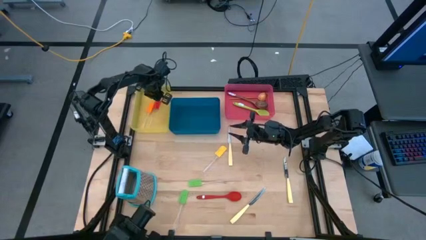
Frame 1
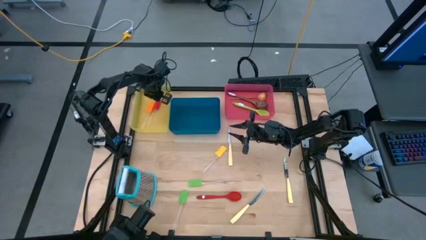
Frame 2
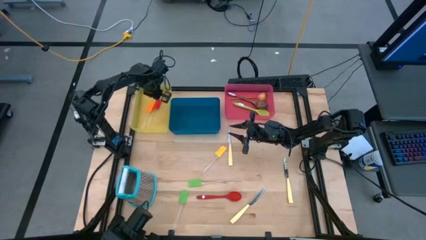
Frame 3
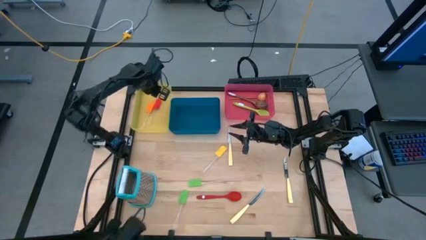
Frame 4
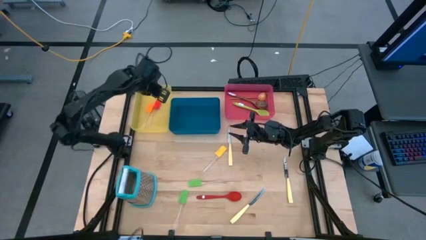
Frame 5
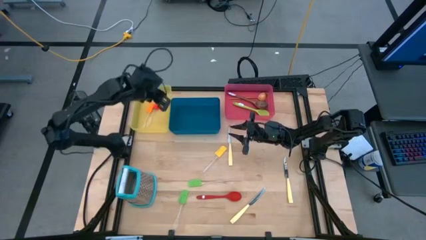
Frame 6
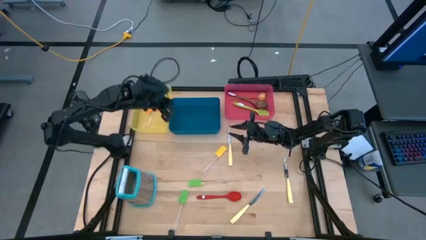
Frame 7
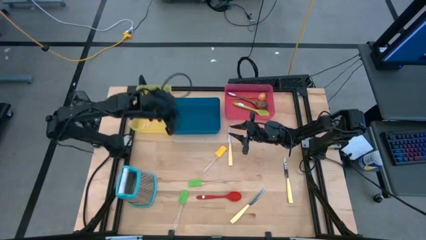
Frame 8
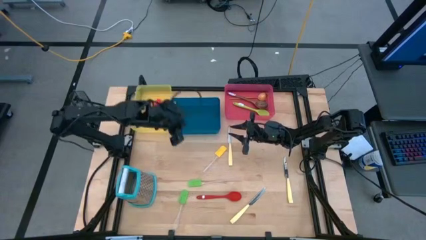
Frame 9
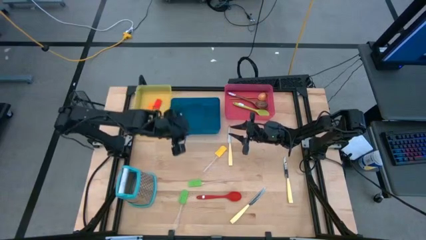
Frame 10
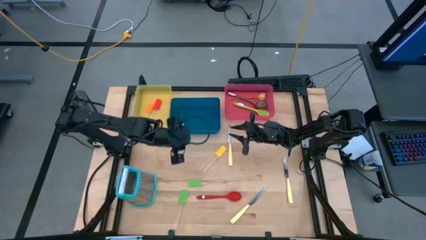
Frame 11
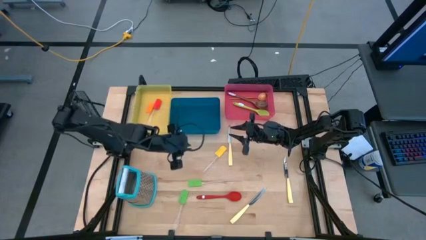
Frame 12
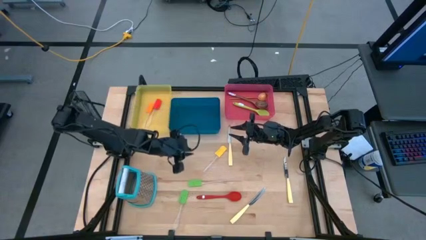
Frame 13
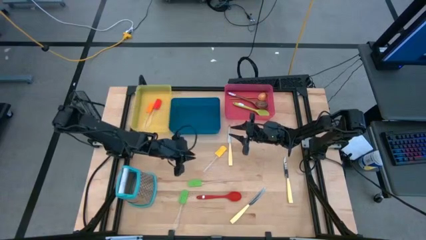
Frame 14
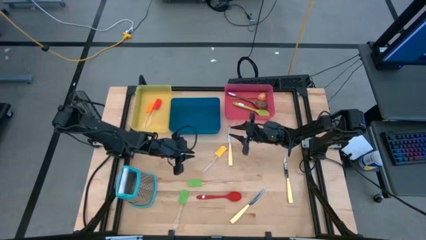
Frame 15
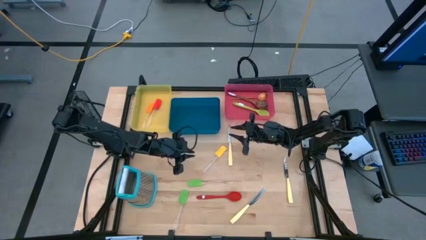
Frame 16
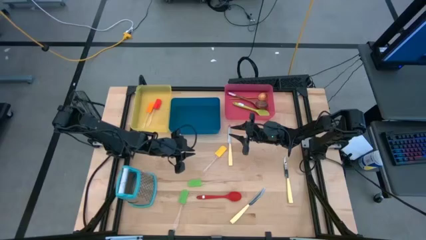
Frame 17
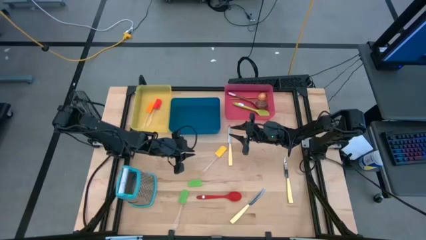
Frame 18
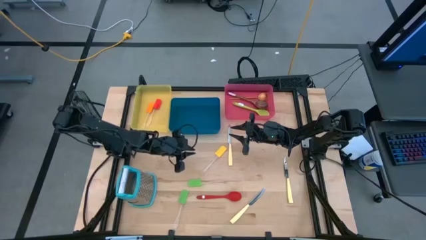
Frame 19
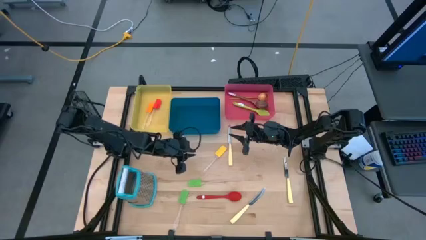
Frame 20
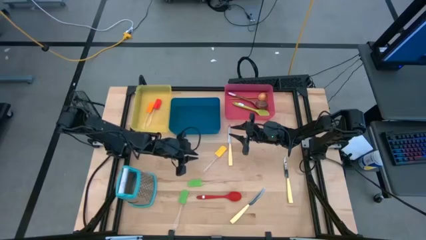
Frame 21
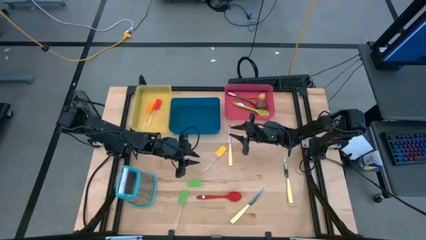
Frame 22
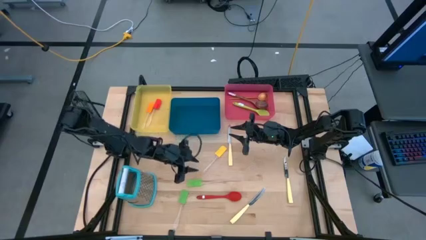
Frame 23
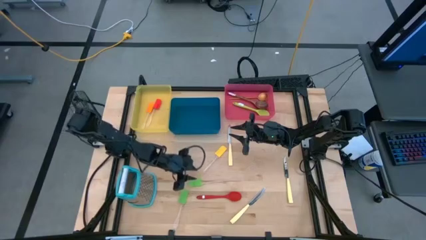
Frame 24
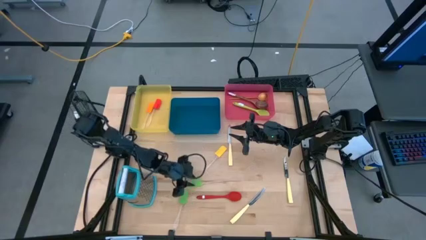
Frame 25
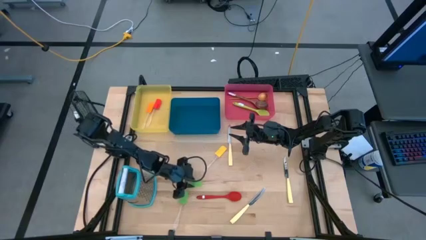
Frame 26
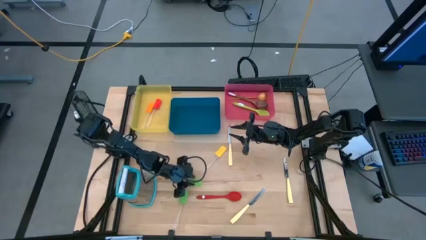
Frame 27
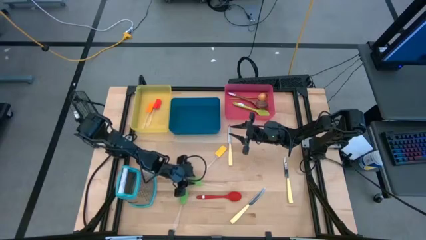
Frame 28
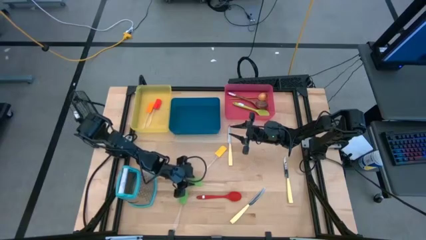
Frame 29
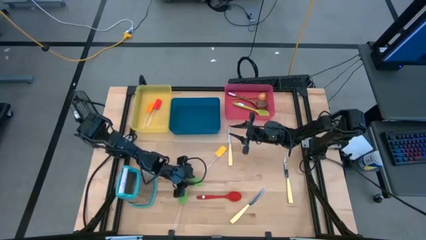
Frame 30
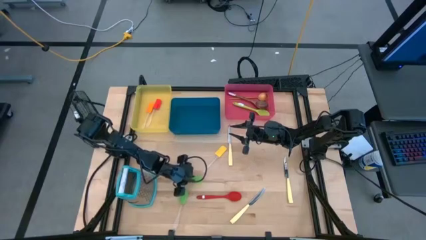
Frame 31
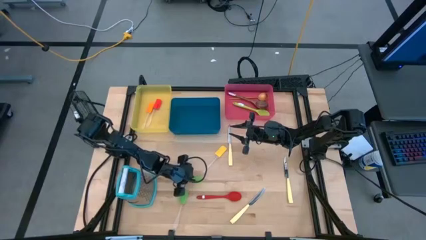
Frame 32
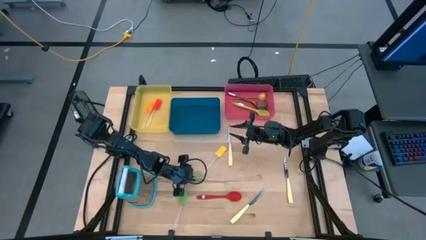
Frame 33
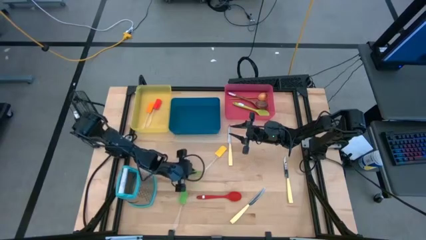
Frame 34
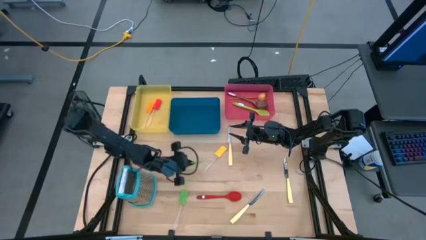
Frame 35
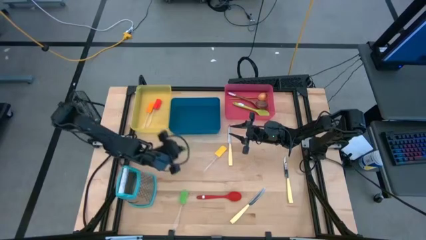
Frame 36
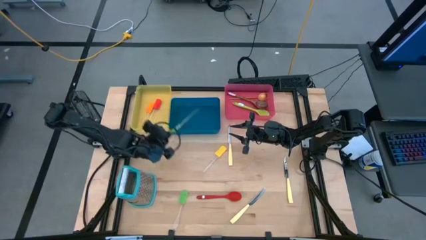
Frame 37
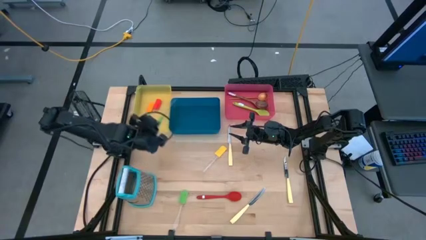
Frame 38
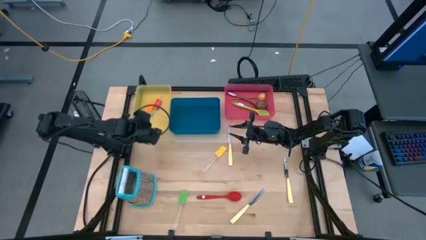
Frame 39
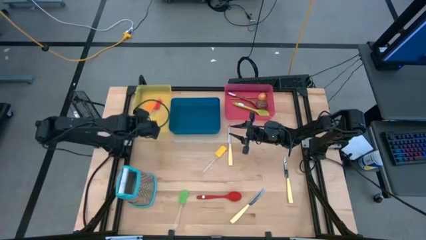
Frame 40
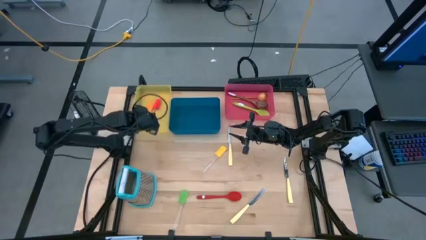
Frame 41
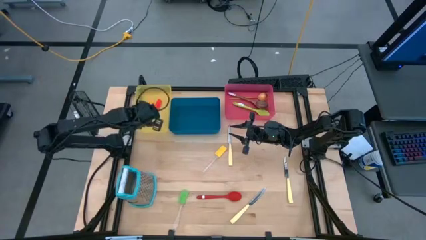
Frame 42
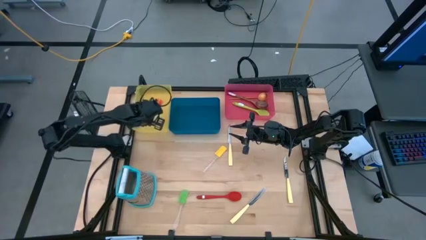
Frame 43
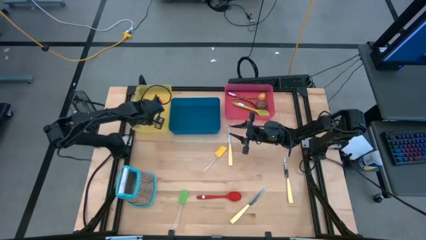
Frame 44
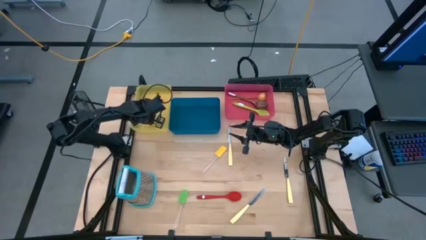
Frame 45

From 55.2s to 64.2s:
Task: Pick & Place Kitchen Items
Put the top green spatula into the yellow bin

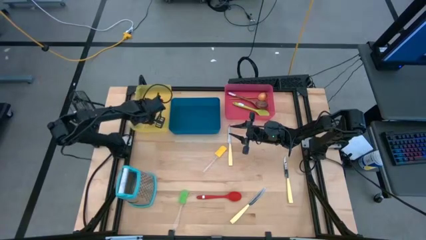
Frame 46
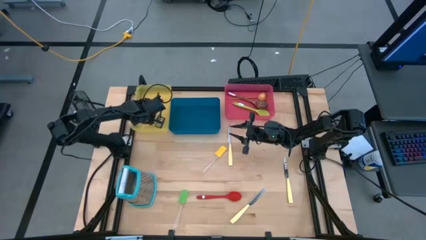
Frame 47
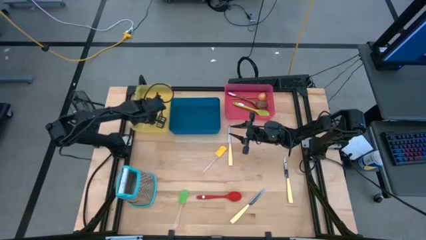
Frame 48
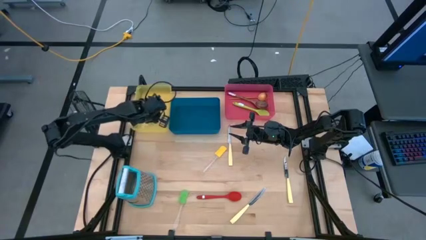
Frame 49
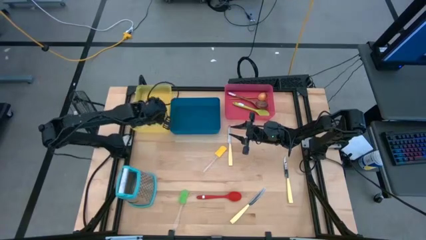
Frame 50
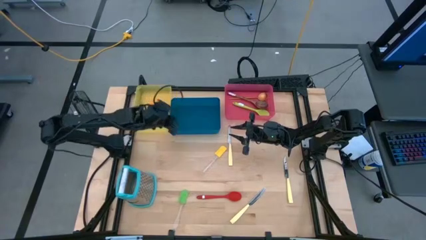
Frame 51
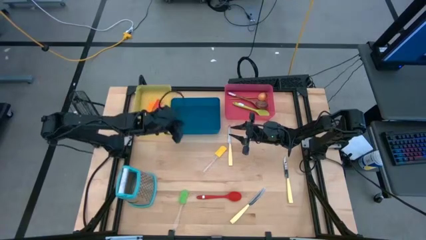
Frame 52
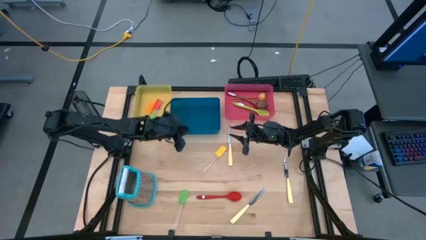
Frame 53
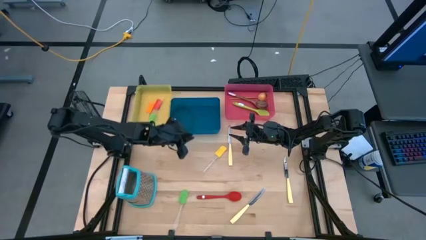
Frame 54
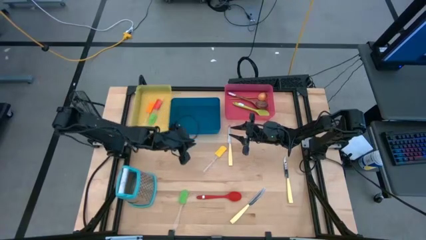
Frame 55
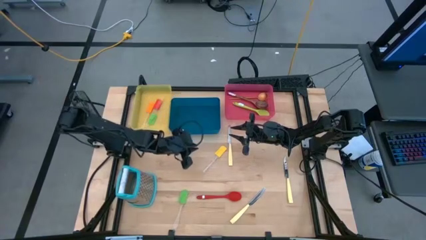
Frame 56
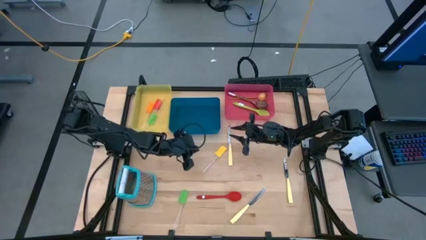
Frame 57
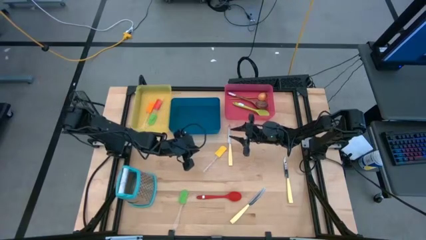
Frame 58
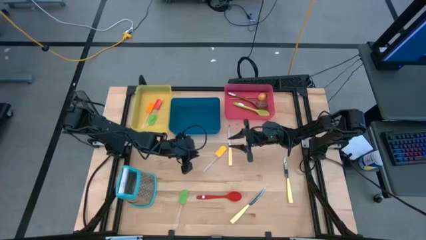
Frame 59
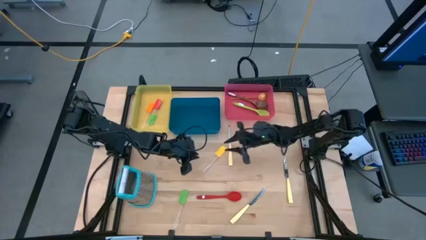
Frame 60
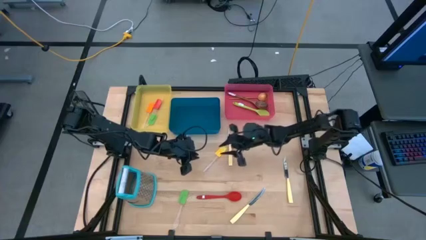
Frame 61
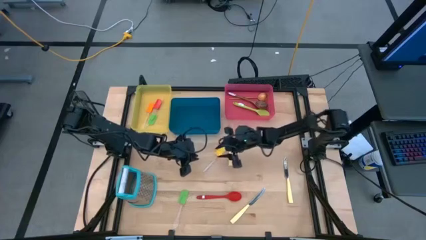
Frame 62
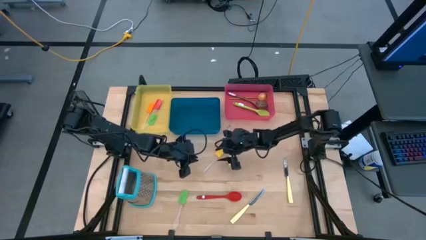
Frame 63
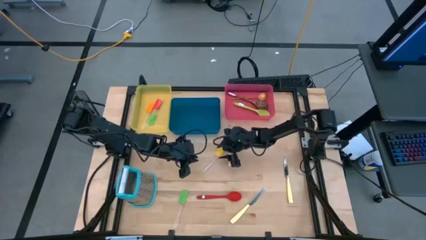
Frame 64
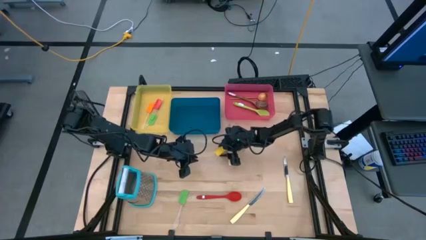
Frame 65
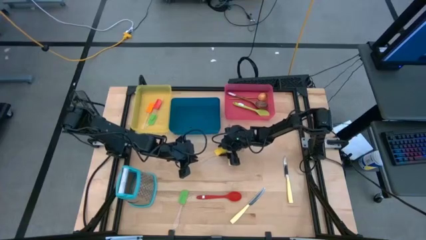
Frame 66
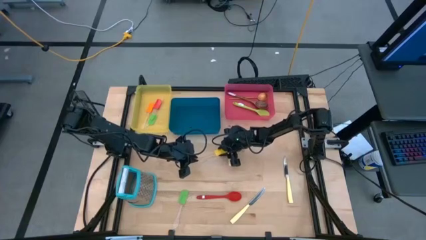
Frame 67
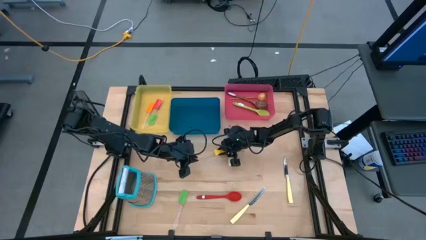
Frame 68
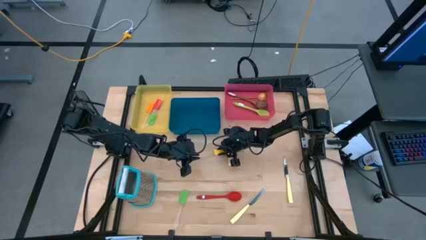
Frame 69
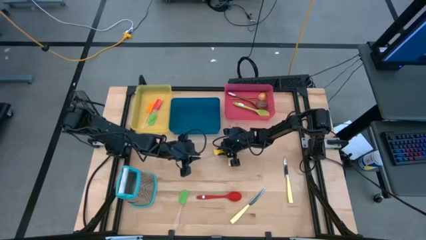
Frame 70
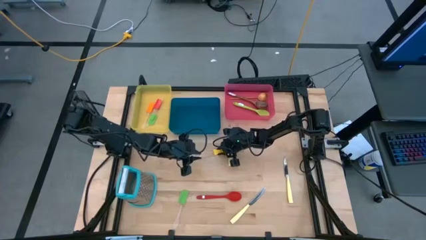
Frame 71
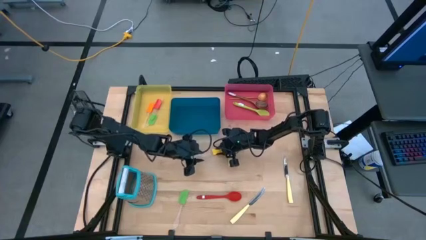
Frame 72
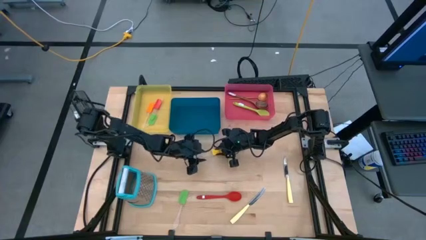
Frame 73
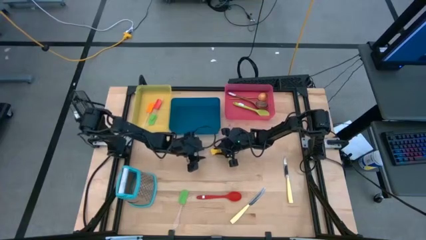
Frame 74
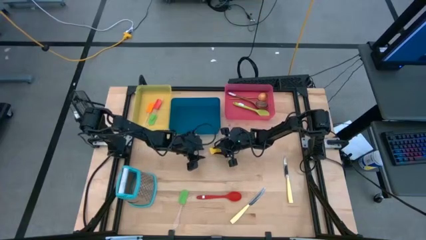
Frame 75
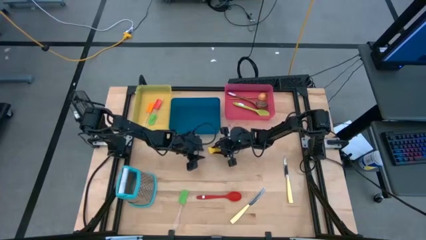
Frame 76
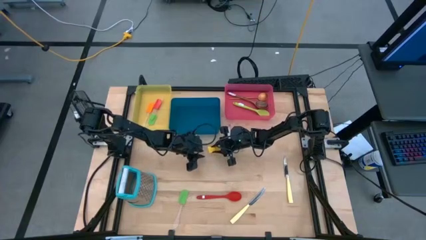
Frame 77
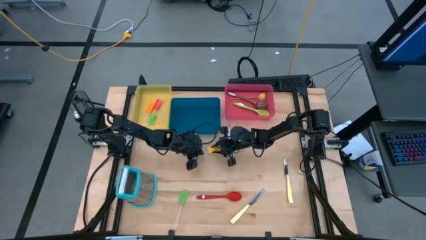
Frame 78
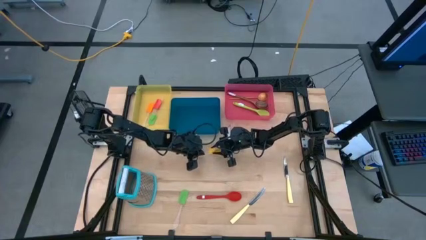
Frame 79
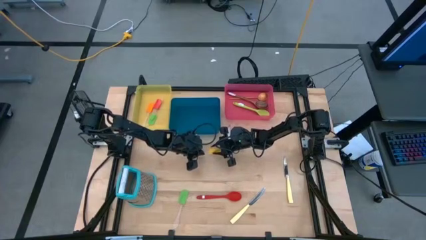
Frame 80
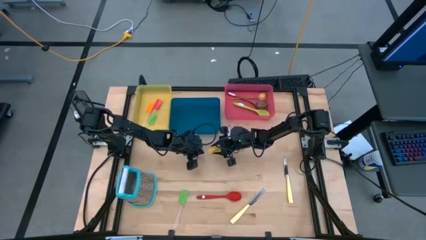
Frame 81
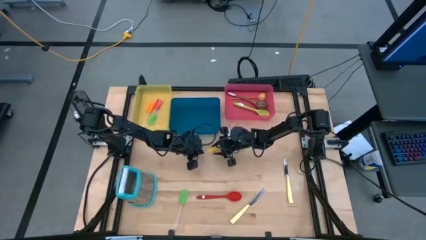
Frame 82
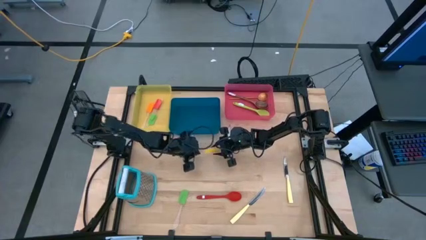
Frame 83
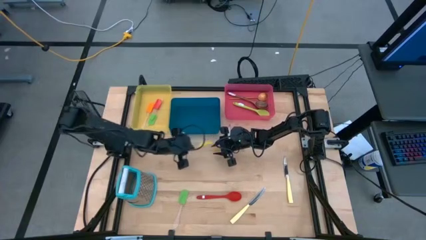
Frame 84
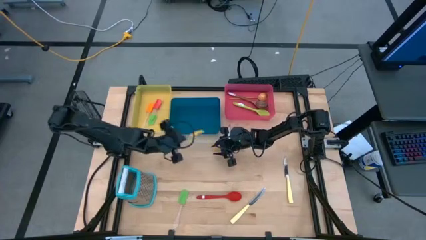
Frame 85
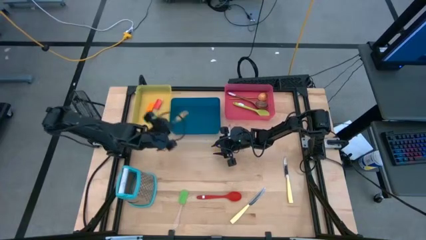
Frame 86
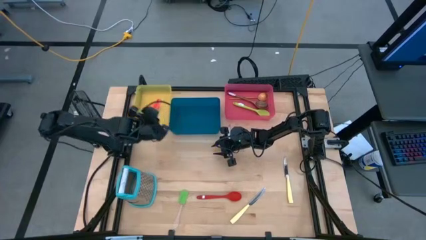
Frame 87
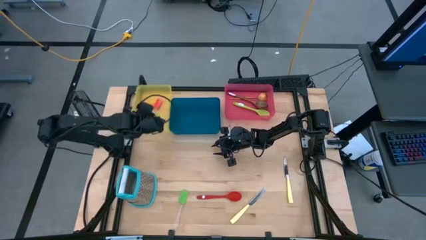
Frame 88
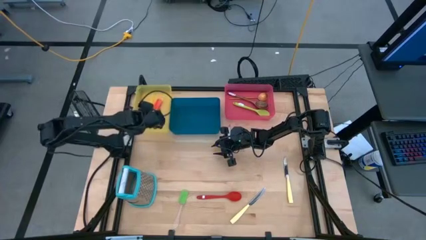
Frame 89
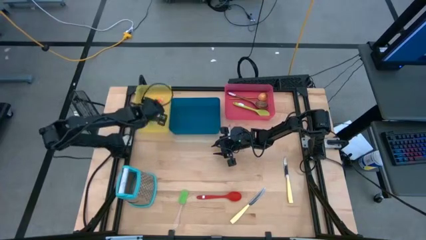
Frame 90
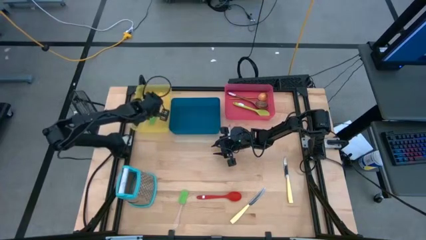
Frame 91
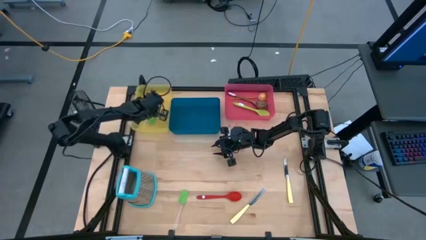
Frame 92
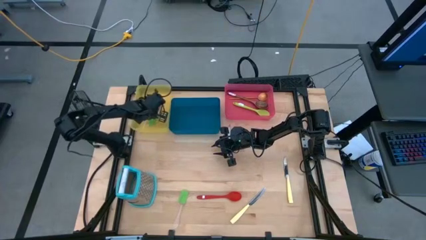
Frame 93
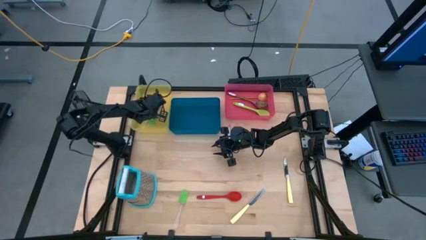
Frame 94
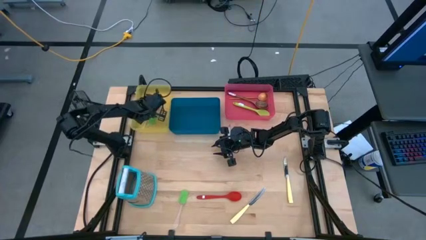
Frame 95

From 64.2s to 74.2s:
Put the yellow spatula into the yellow bin
